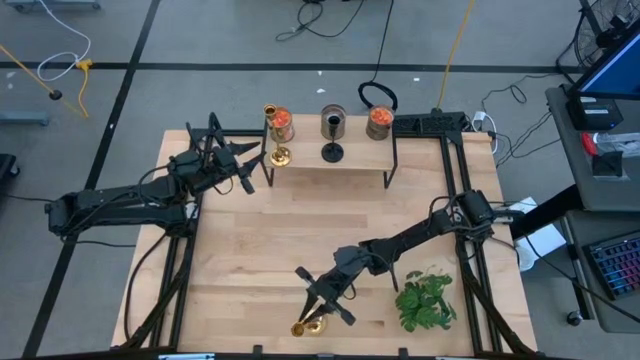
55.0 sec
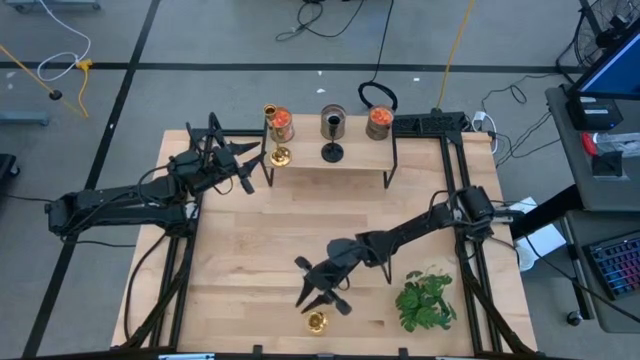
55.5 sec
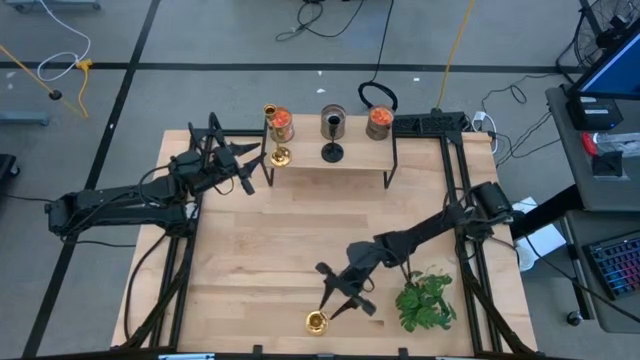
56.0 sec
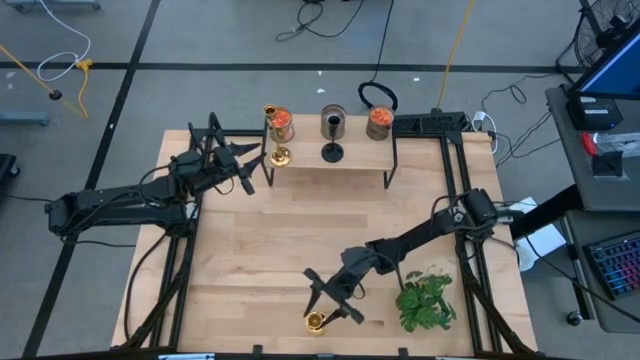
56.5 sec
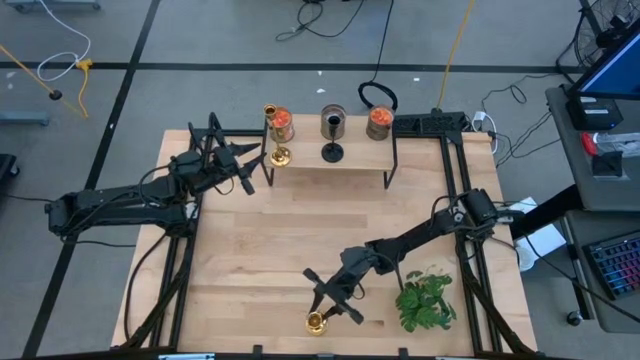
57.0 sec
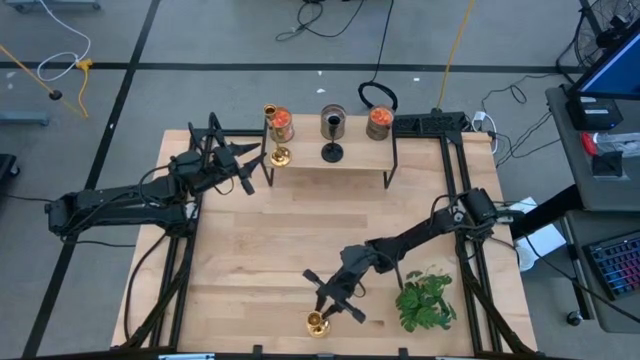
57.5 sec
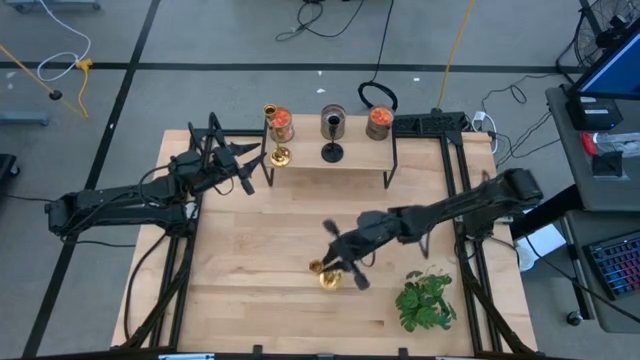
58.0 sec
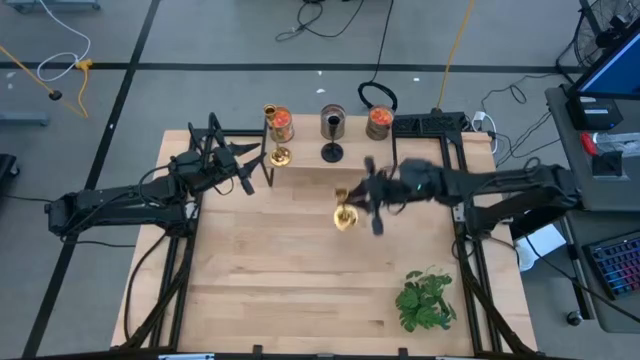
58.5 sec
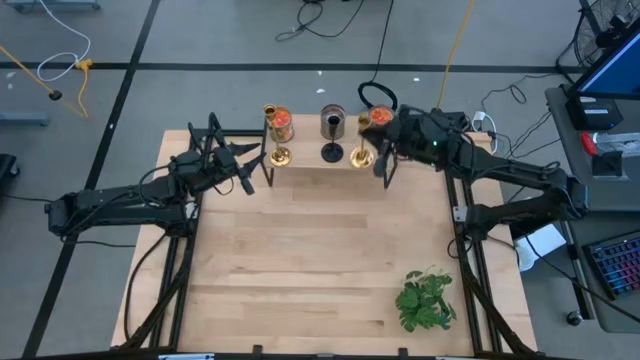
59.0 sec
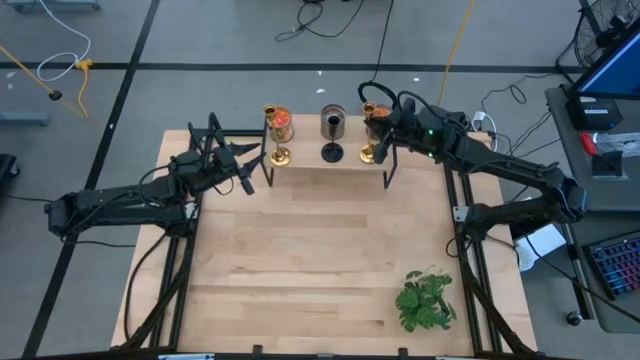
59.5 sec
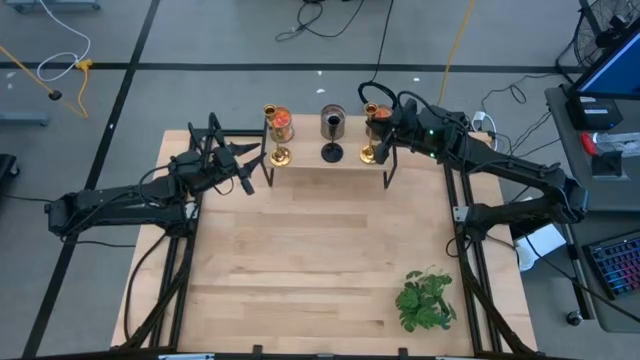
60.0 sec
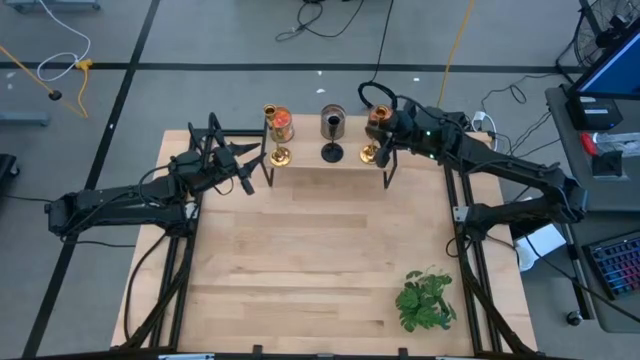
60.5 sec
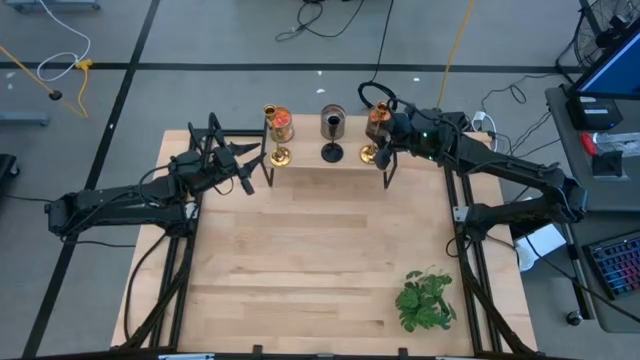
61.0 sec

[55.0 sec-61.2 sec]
Task: Pick & Place candle stick holders
Align the gold candle holder with the other candle holders

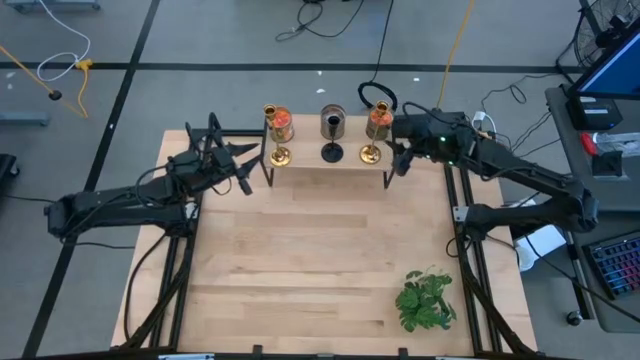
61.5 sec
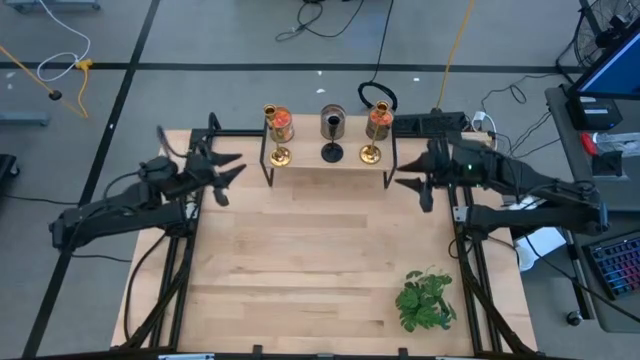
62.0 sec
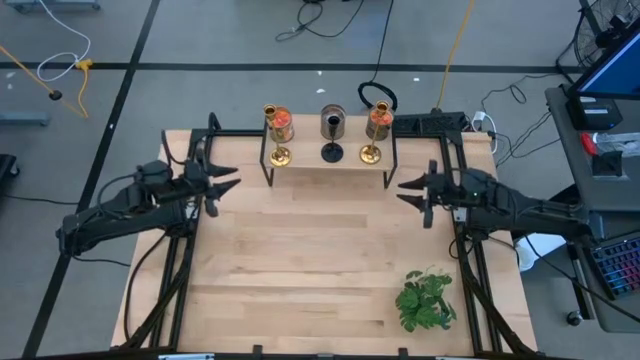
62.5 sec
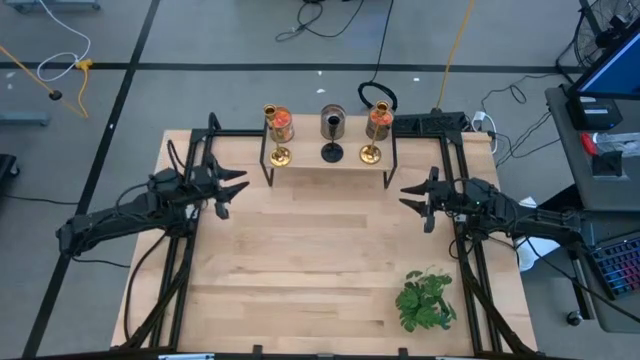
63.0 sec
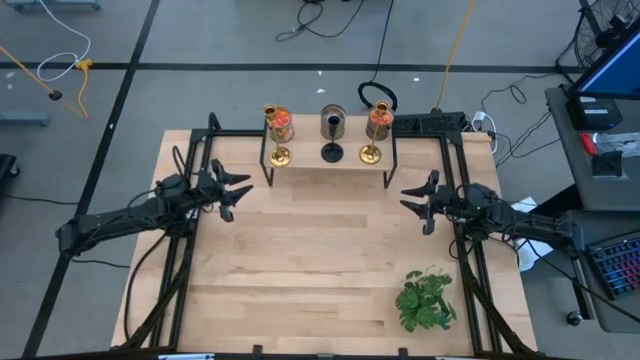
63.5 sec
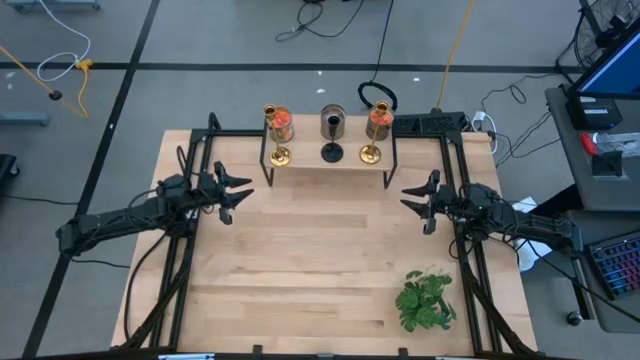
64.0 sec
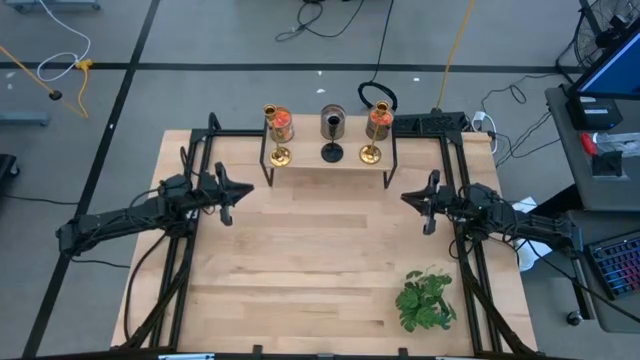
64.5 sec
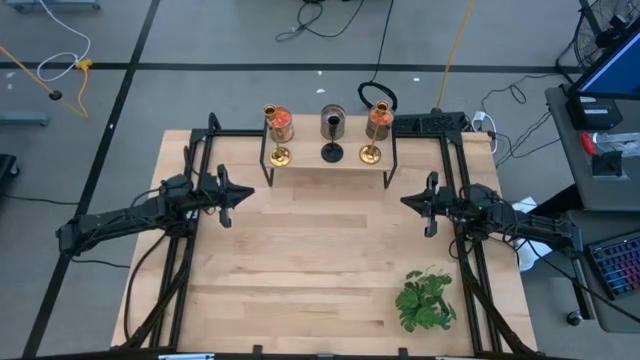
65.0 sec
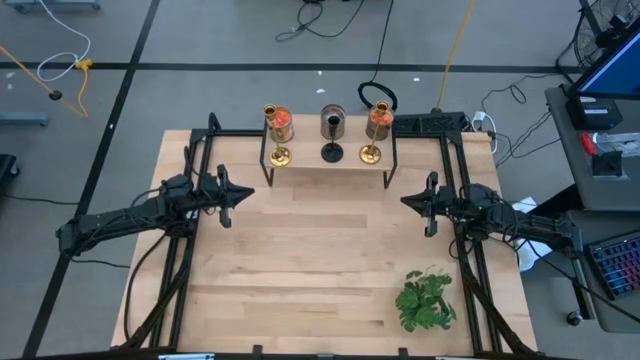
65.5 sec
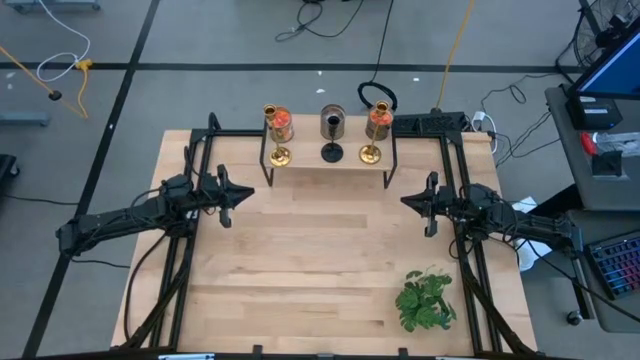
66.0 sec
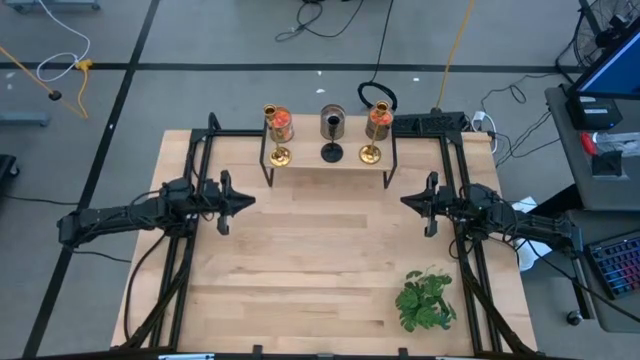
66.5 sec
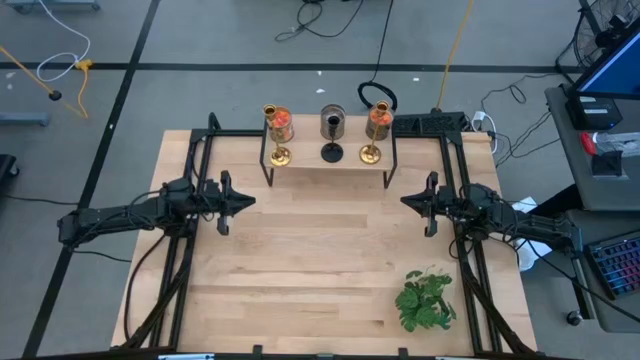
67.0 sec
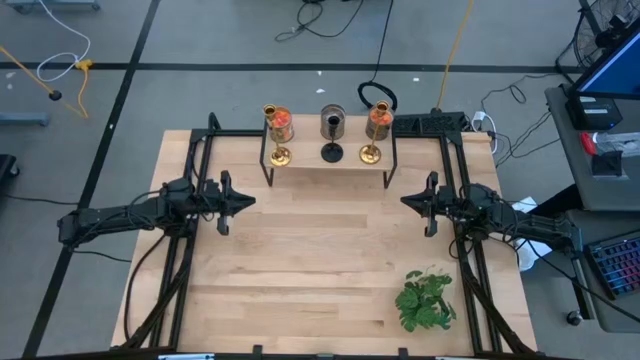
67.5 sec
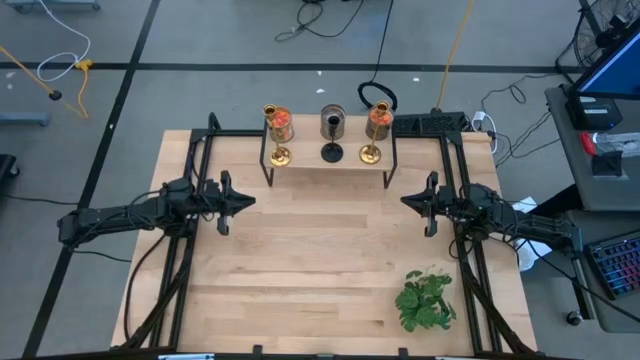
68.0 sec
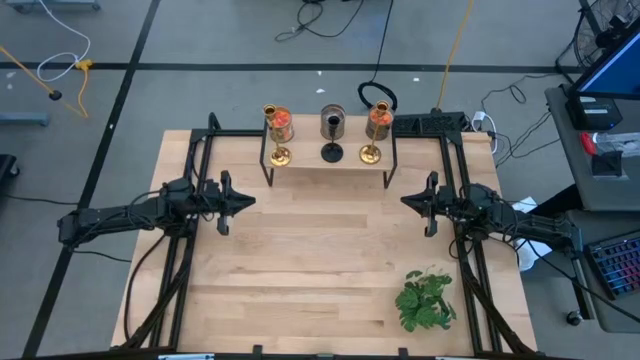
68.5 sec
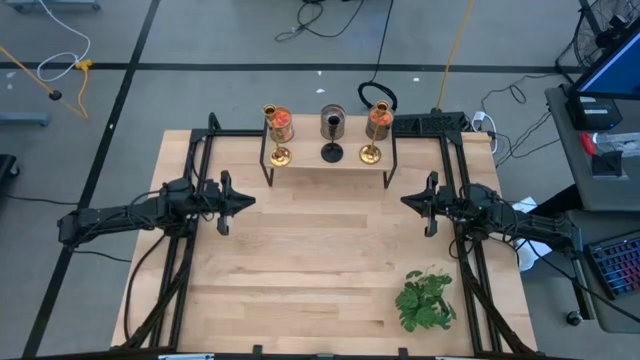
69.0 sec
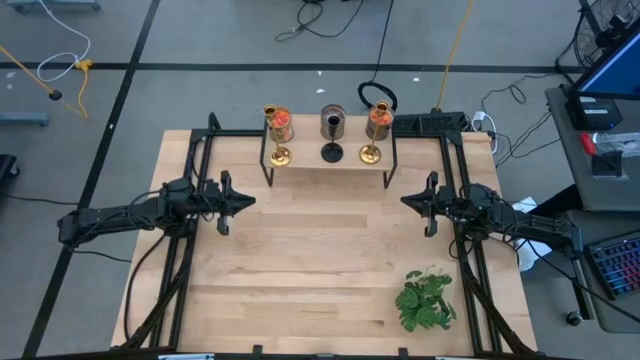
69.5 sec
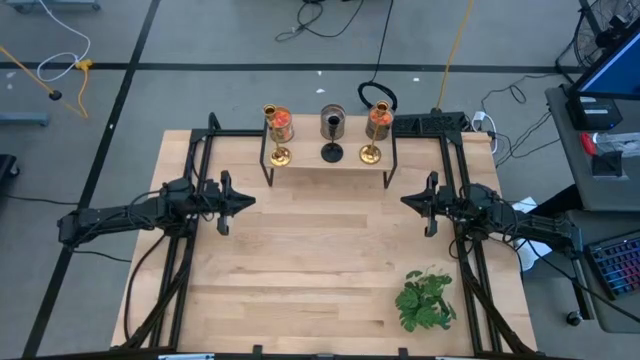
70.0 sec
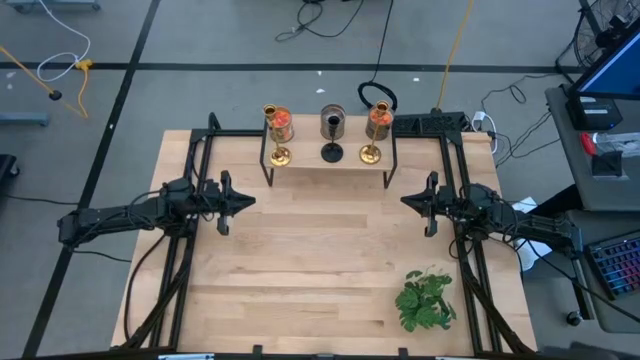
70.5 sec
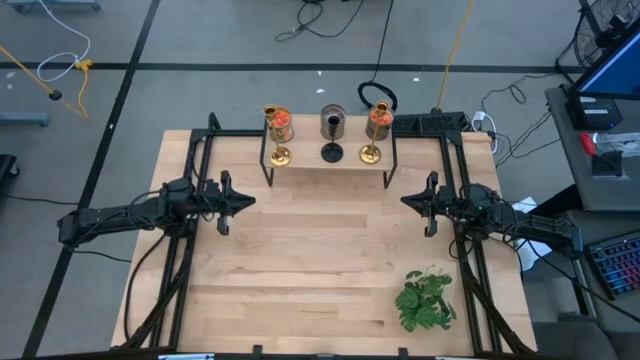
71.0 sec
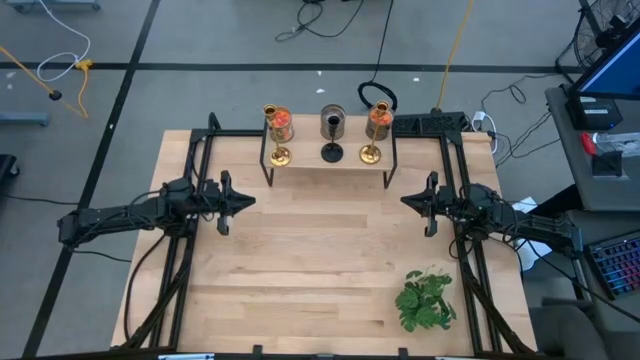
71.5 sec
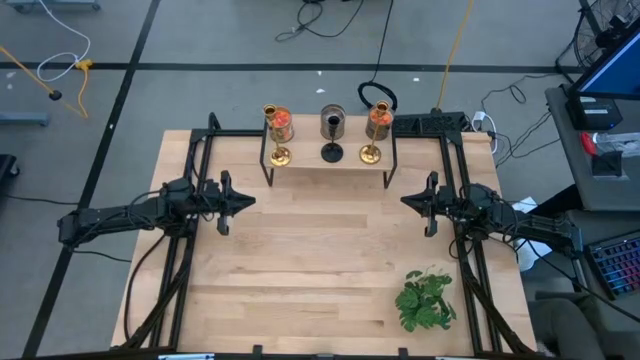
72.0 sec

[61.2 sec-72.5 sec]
Return to Home Position

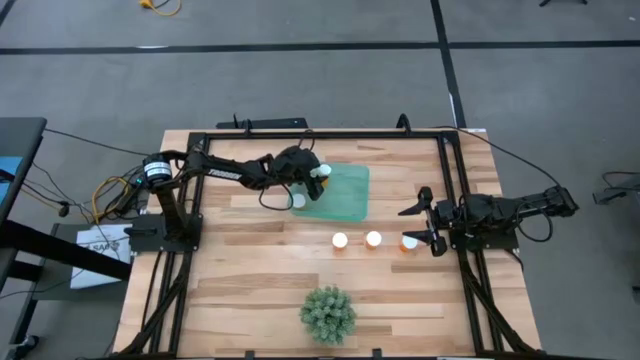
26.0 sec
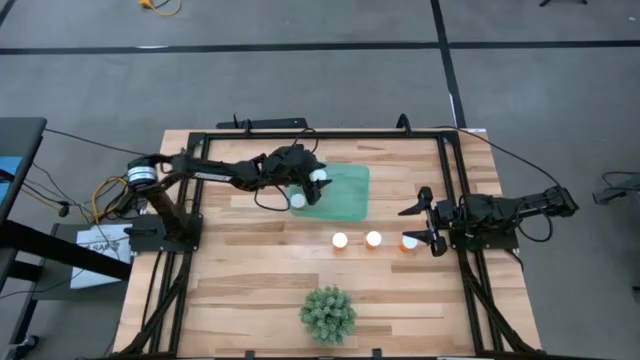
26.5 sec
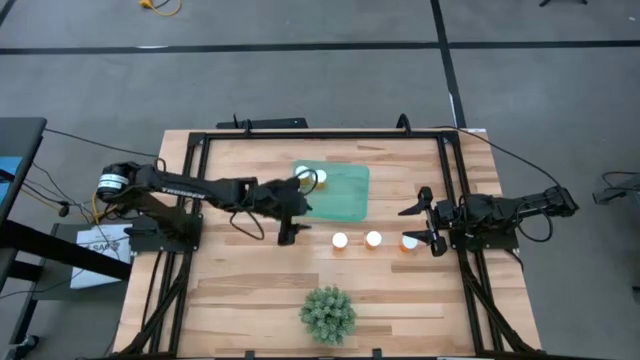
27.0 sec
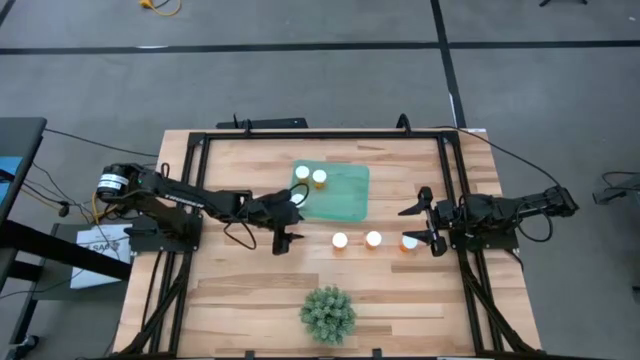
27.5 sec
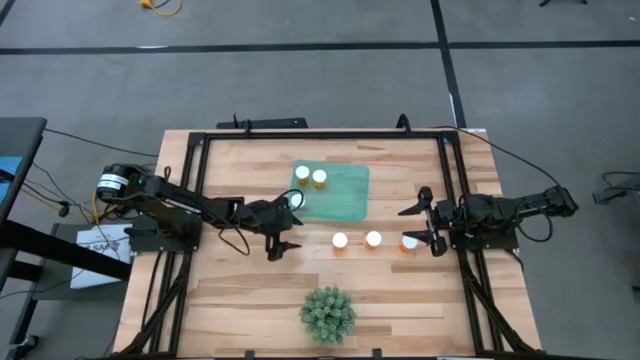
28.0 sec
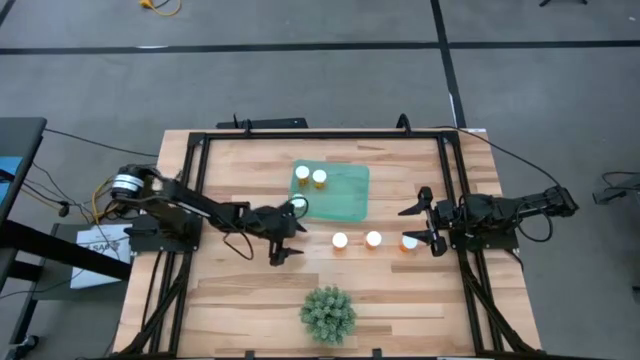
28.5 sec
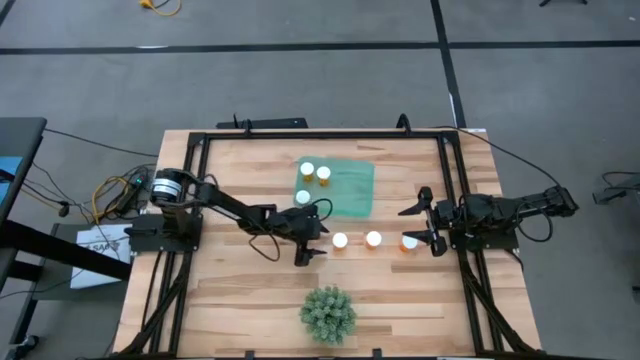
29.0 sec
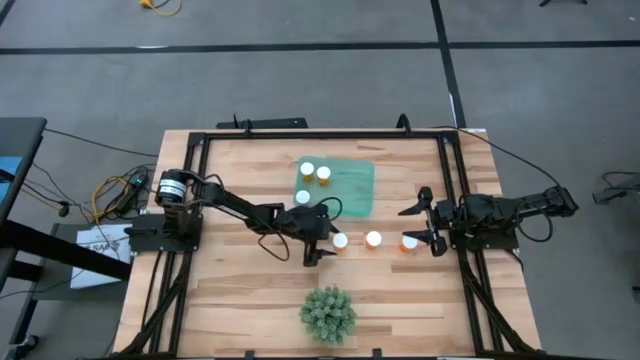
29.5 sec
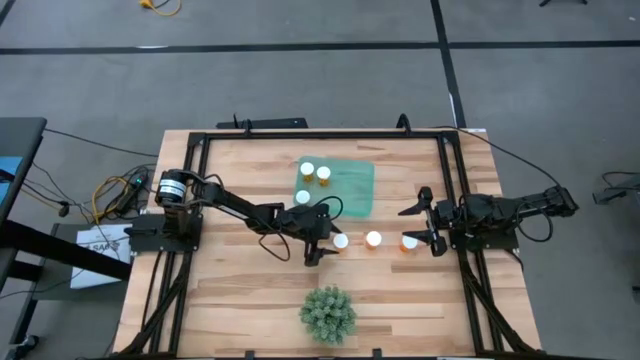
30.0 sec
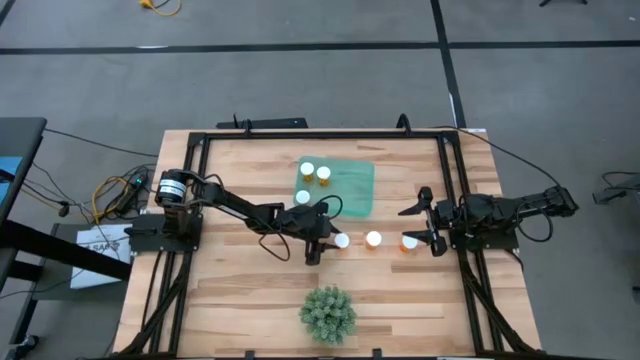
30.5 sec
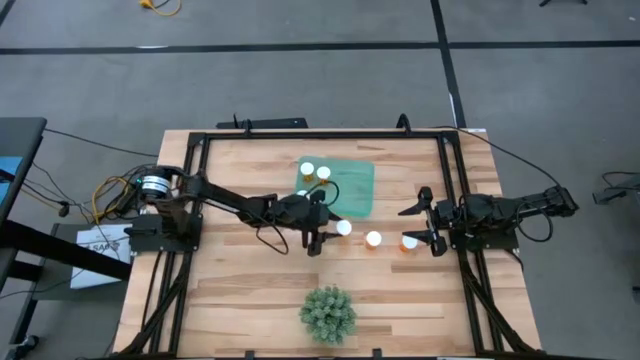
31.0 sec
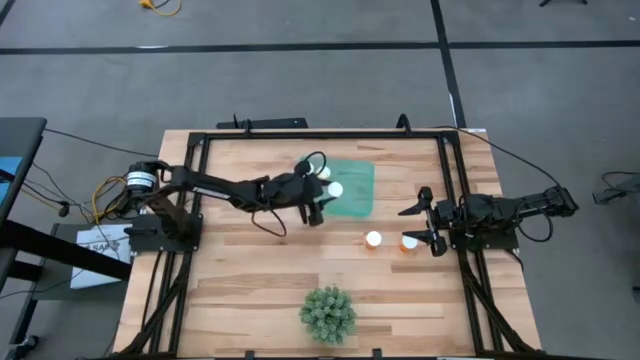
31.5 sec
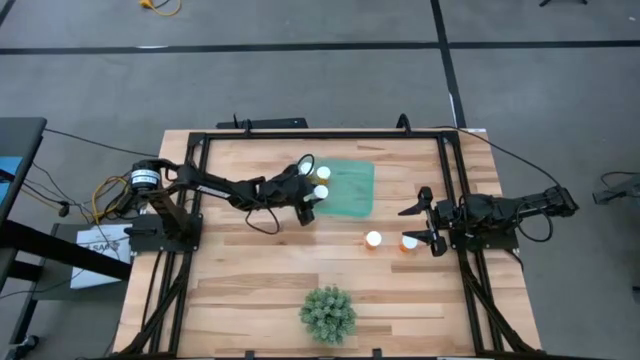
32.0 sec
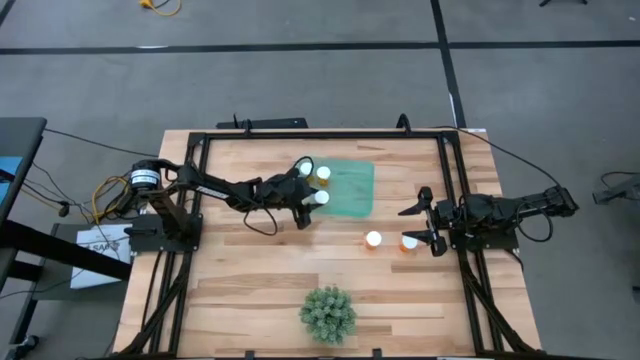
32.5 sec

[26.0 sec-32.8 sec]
Task: Pick and place pill bottles into a basket
Put the orange pill bottle into the green bin
